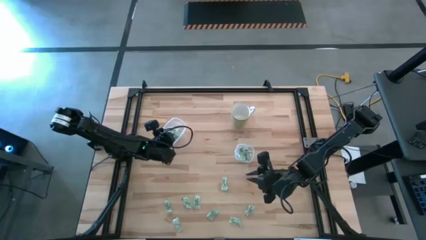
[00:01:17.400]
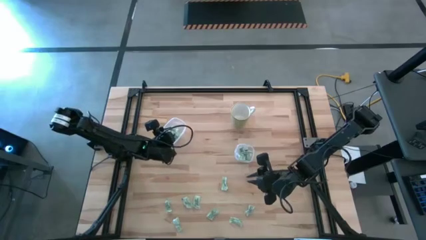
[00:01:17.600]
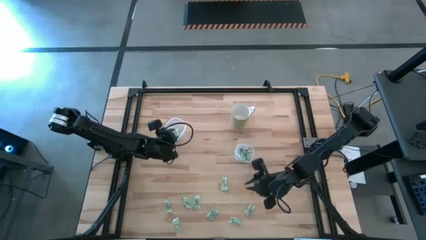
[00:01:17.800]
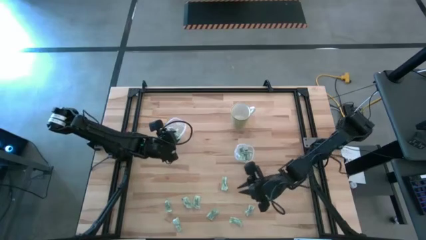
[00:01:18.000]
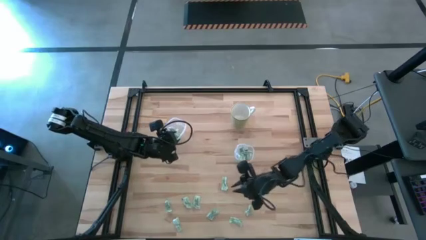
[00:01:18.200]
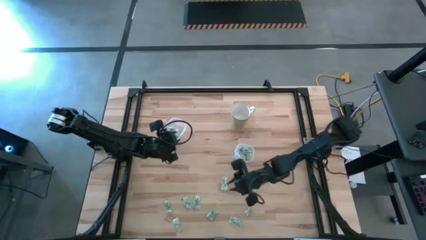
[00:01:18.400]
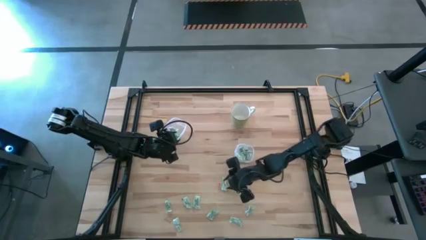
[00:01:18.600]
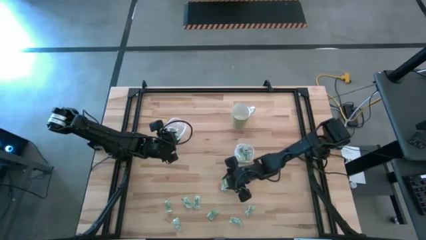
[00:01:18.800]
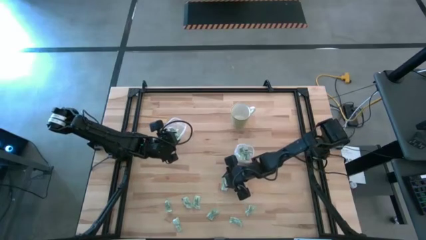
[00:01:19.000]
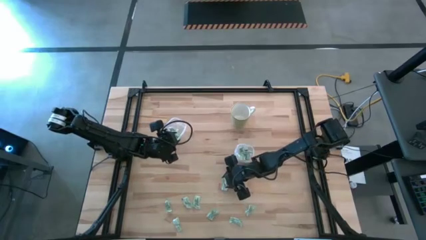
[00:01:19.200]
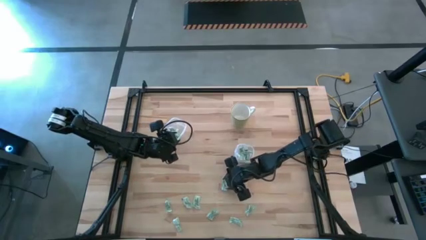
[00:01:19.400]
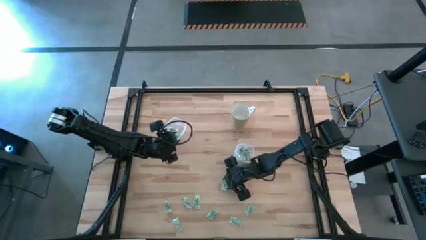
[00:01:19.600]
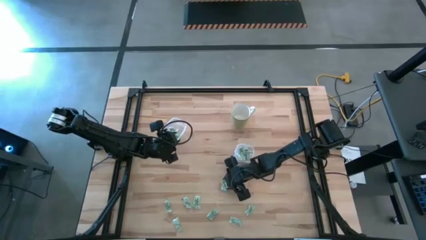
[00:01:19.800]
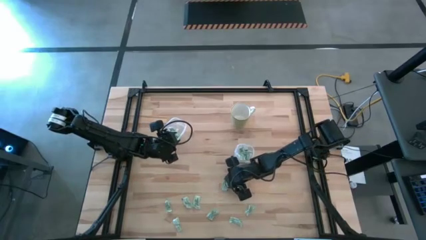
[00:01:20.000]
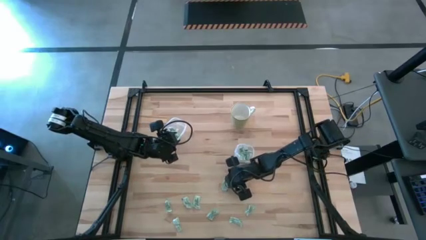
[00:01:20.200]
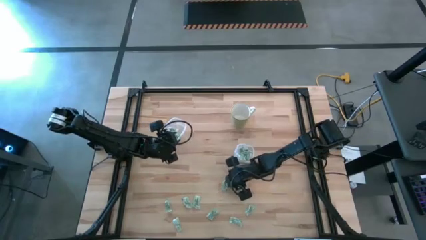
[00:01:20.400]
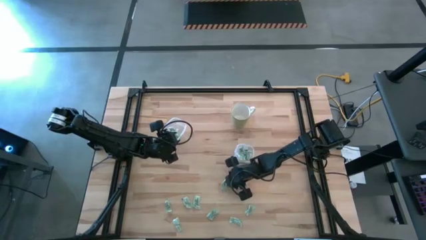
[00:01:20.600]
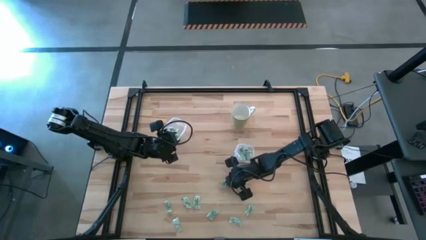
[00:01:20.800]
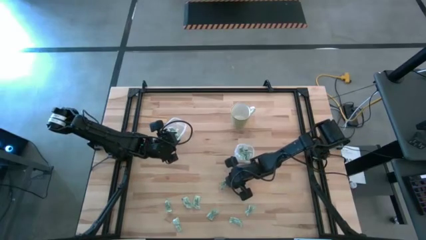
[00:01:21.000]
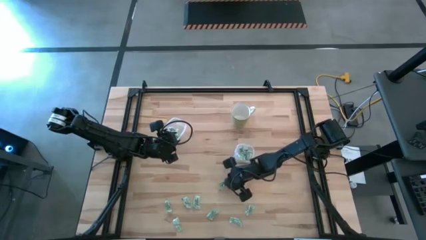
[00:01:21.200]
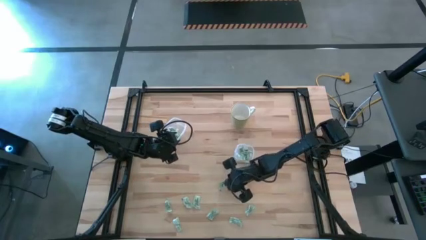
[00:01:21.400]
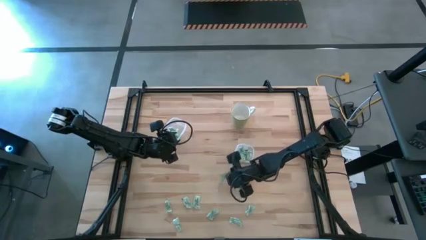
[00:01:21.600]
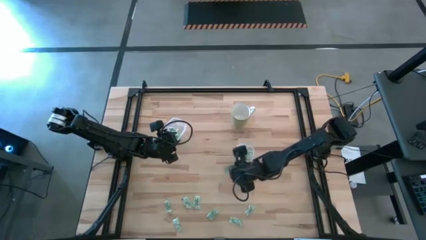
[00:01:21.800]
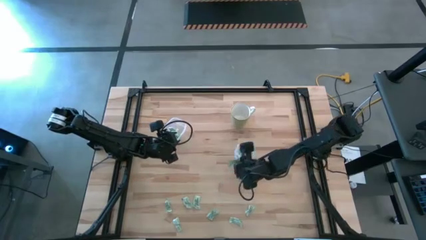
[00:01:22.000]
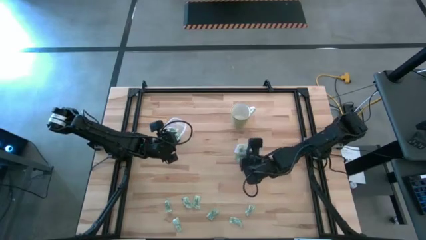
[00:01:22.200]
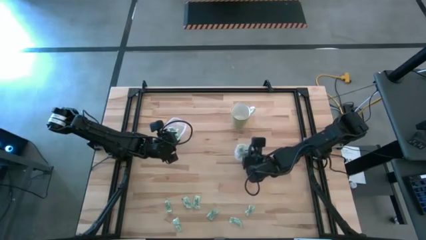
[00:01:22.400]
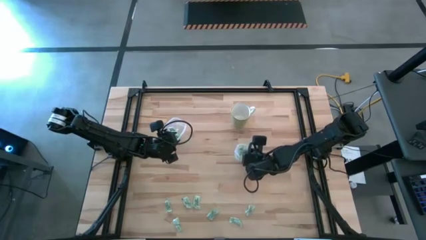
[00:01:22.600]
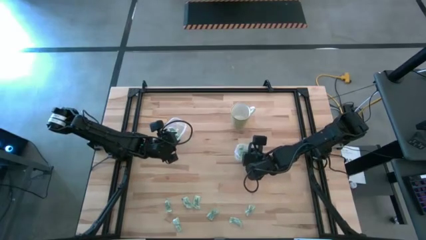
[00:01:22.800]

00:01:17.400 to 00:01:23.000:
Task: Pick and place Stevia / Truvia into bins
Put the stevia packet into the right transparent container

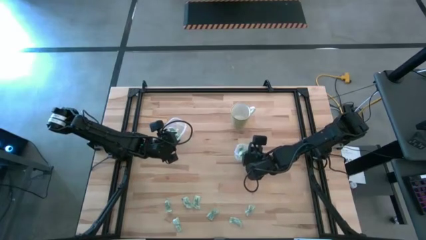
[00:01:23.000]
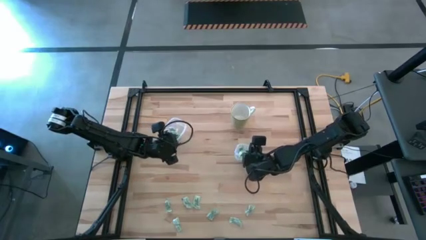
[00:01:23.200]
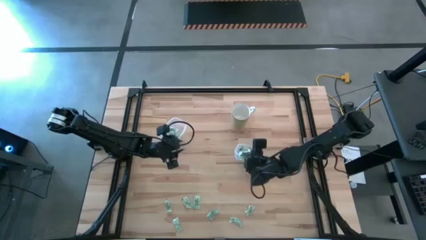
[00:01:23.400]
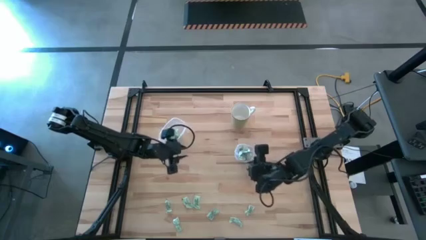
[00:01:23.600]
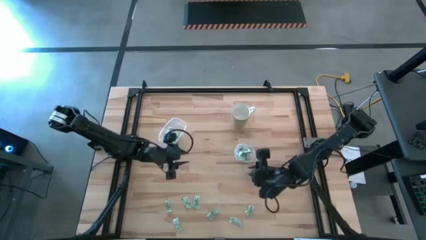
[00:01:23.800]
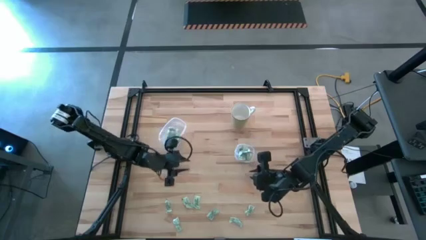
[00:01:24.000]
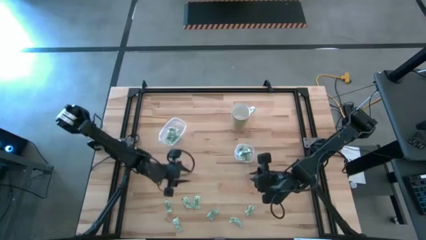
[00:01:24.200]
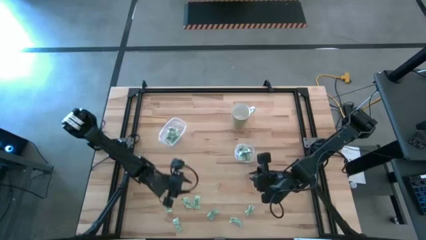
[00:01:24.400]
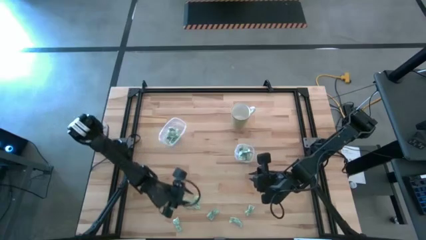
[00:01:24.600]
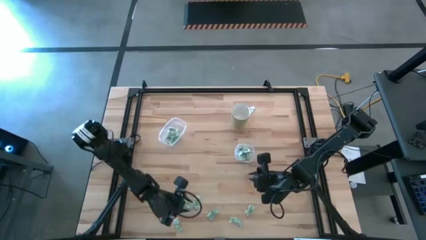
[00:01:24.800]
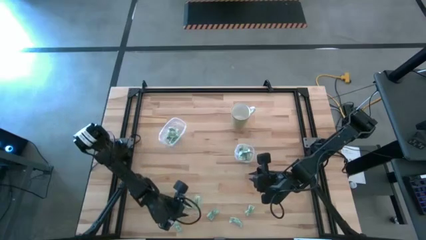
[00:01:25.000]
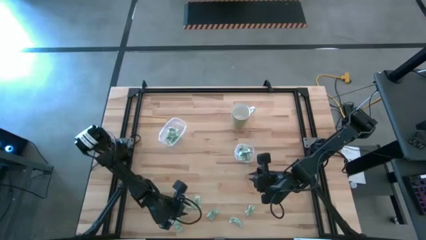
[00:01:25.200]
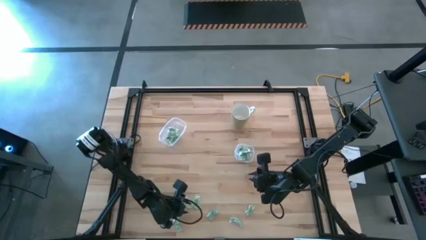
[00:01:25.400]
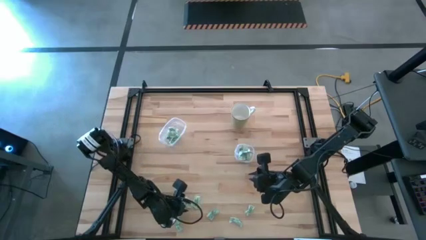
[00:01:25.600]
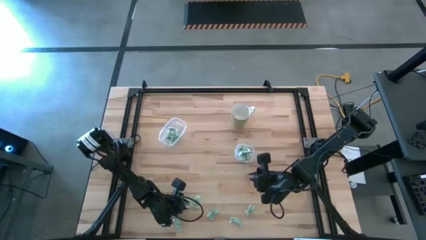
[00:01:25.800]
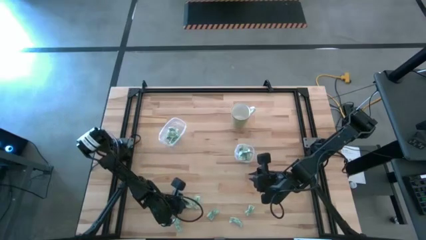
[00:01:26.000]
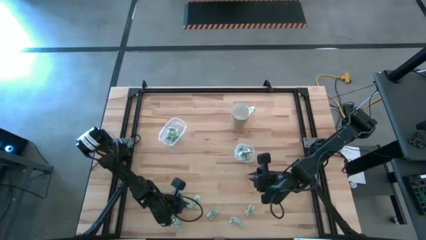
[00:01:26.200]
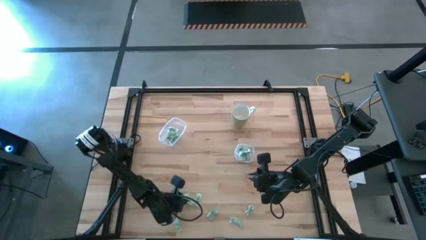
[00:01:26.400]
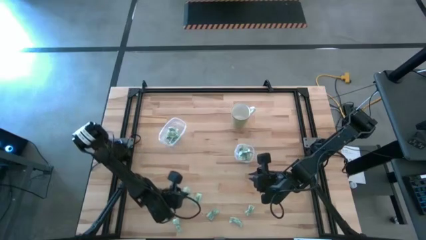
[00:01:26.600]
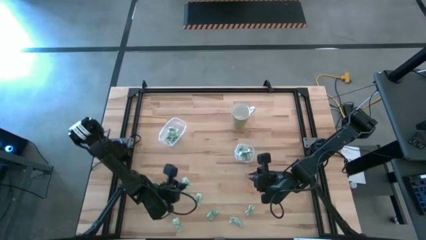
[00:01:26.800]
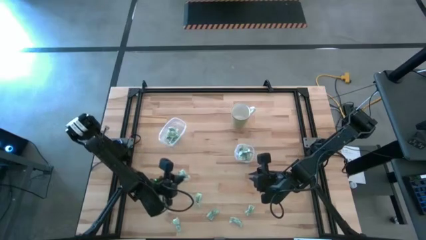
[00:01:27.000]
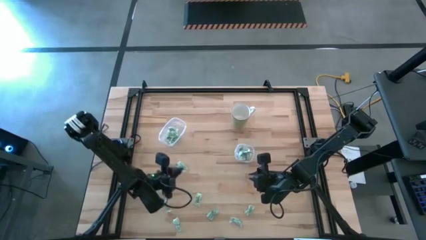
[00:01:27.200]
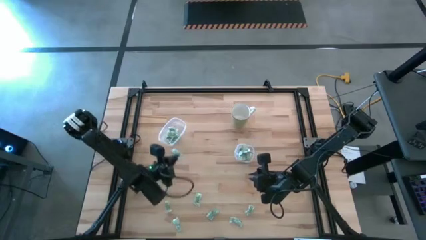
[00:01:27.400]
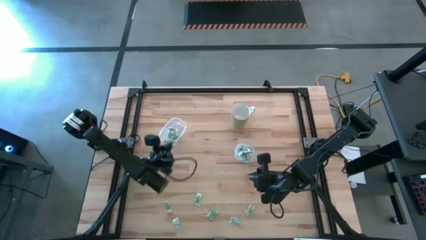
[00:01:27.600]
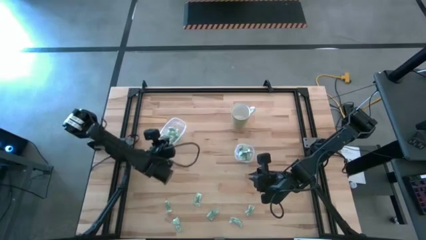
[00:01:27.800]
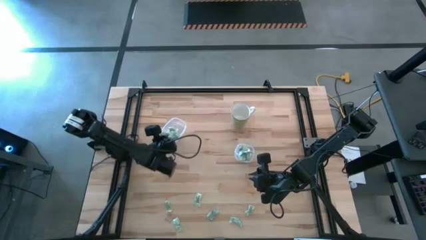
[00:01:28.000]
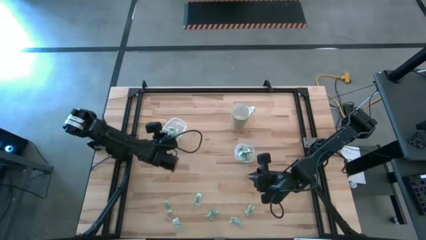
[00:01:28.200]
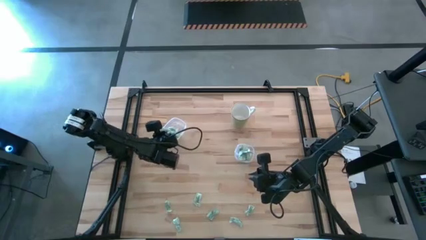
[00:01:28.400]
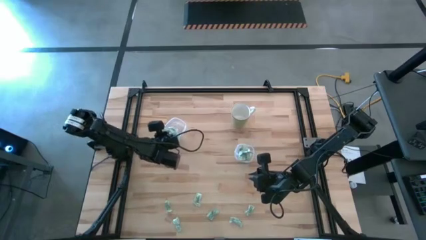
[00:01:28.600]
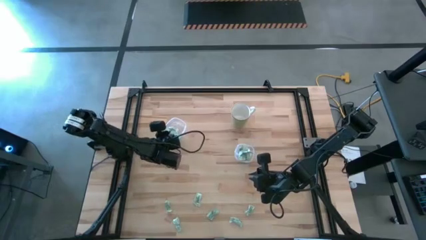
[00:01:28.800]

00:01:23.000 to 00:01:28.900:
Put the stevia packet into the left transparent container

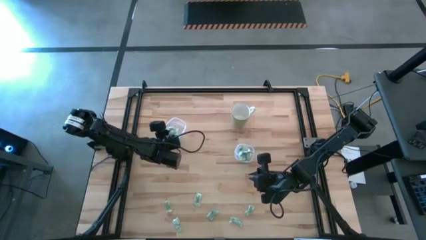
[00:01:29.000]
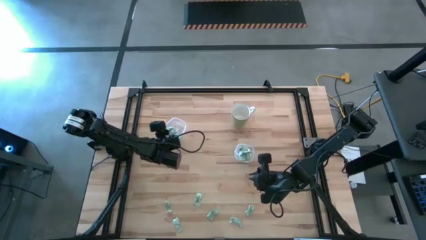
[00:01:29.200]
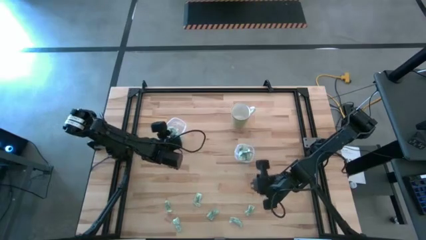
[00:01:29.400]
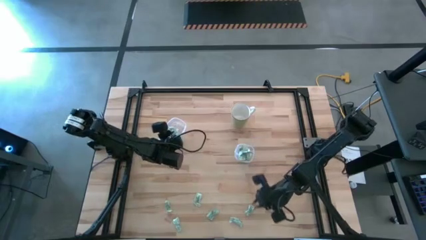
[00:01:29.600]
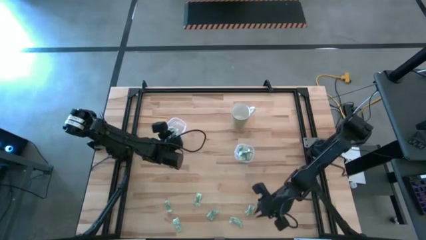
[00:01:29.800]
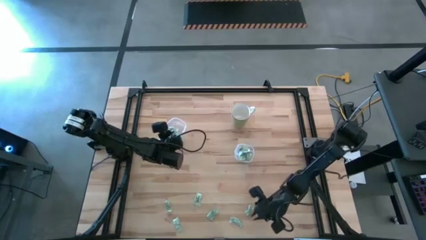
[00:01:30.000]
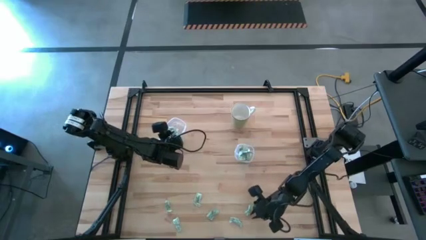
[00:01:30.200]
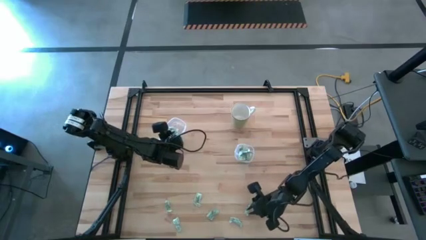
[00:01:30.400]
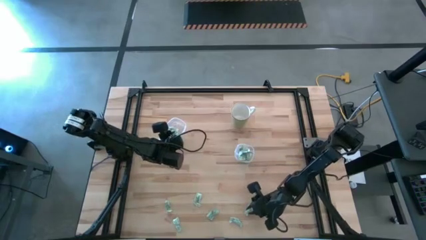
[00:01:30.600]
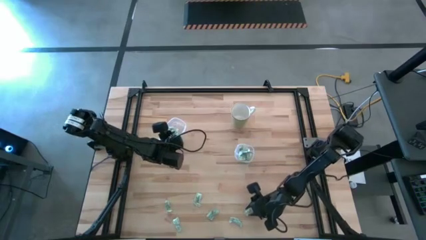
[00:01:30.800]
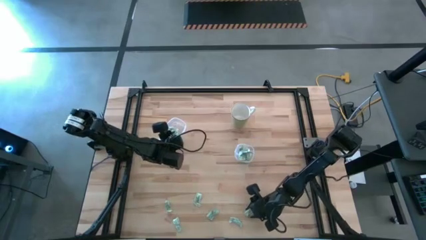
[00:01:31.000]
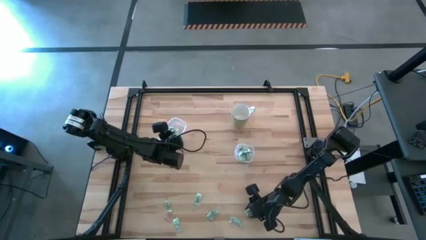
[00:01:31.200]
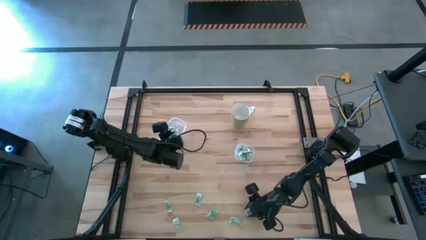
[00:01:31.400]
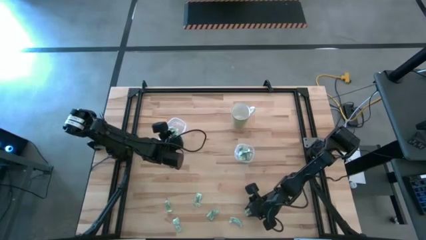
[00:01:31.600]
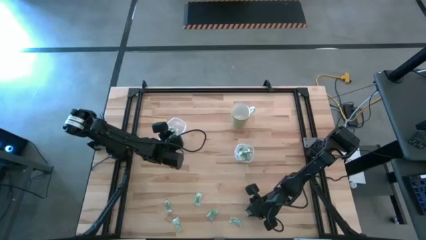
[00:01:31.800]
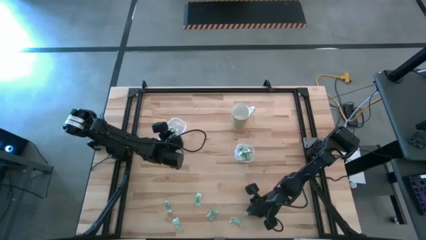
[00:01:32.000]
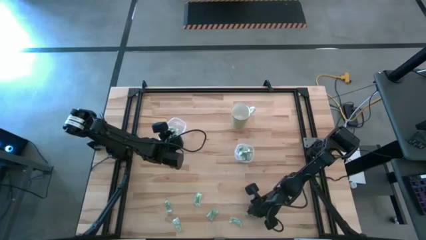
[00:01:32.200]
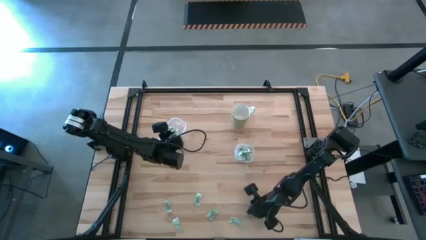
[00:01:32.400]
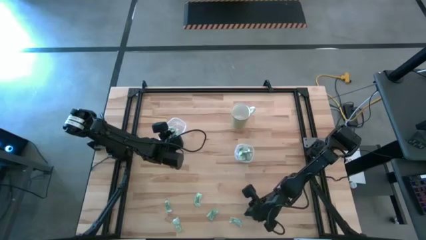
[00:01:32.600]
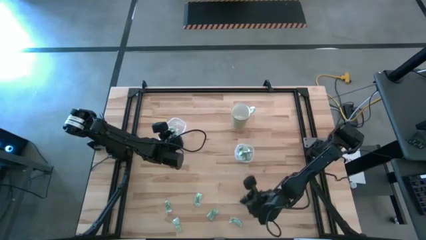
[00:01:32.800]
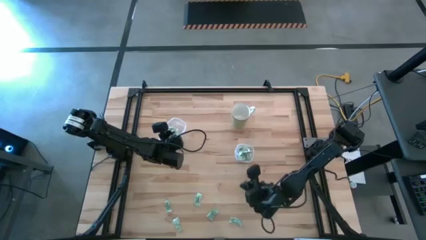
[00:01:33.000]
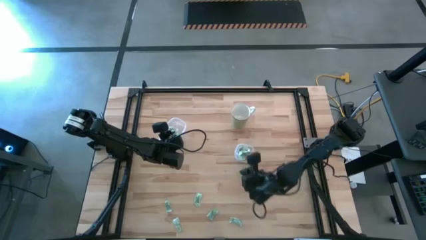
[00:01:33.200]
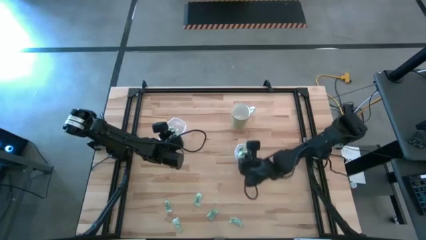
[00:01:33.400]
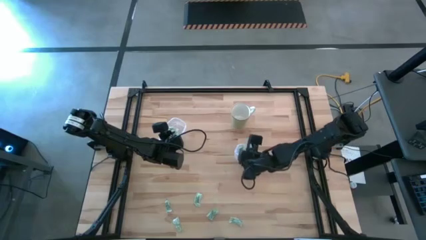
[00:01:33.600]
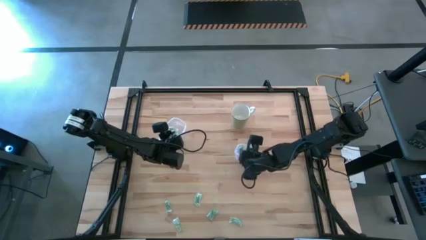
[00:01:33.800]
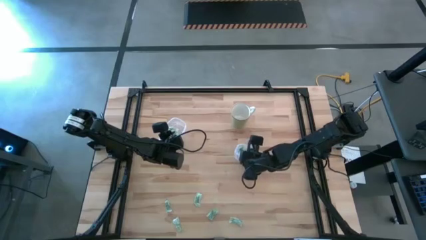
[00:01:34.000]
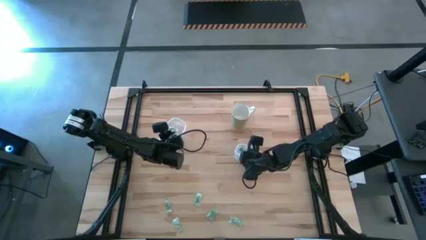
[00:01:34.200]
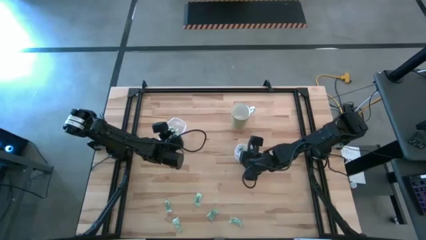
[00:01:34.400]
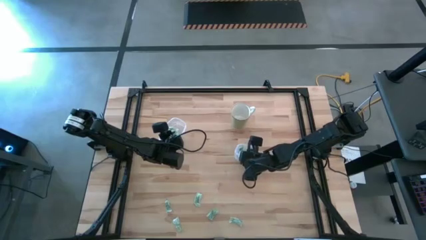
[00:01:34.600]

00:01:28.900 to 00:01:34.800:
Put the stevia packet into the right transparent container
